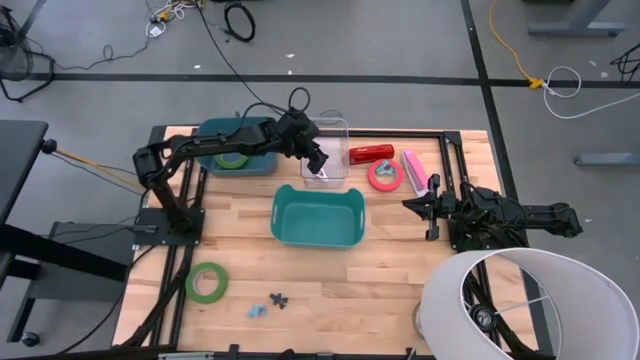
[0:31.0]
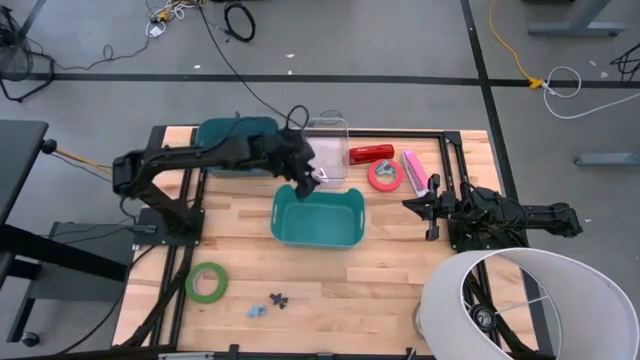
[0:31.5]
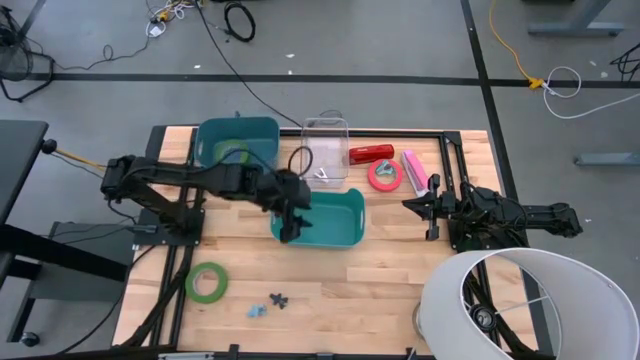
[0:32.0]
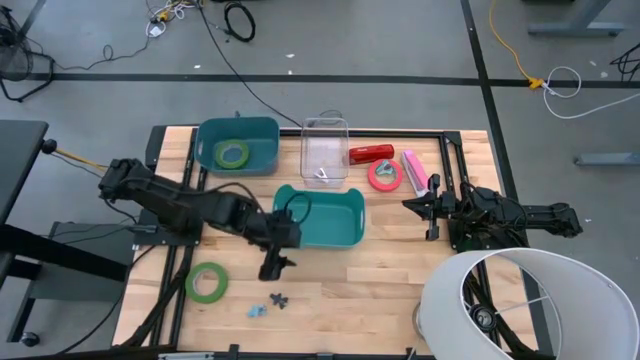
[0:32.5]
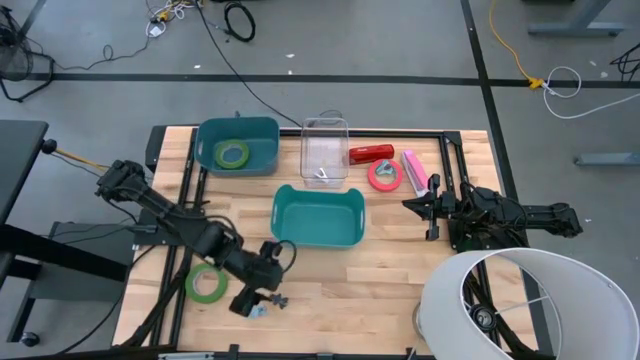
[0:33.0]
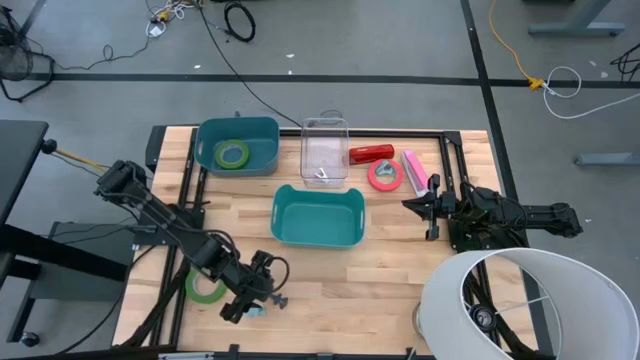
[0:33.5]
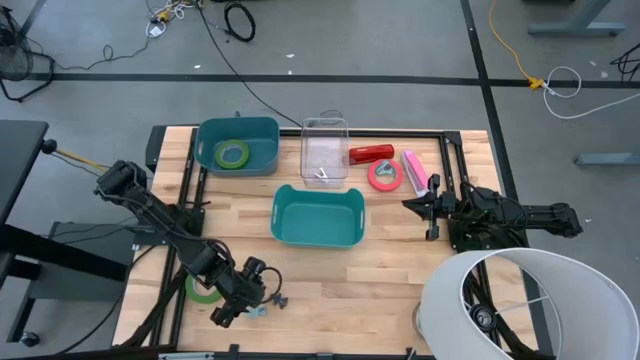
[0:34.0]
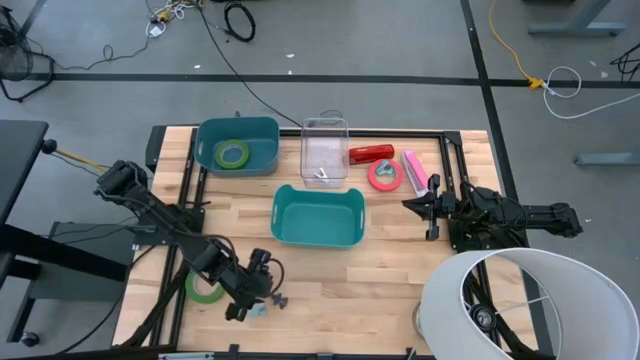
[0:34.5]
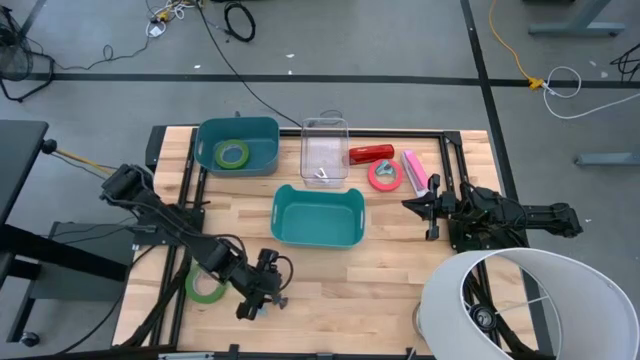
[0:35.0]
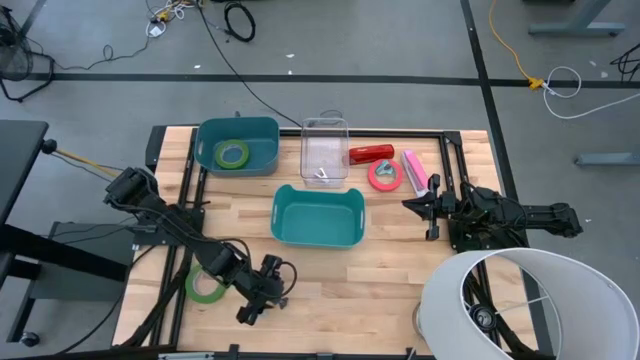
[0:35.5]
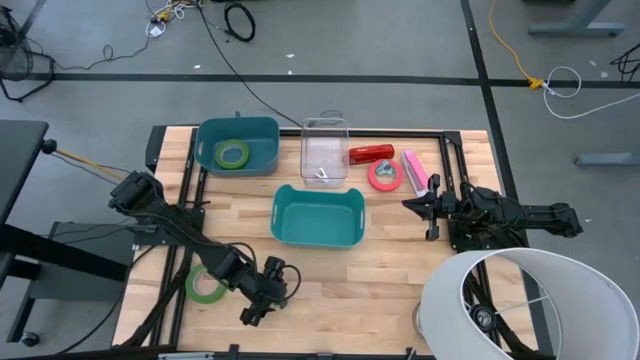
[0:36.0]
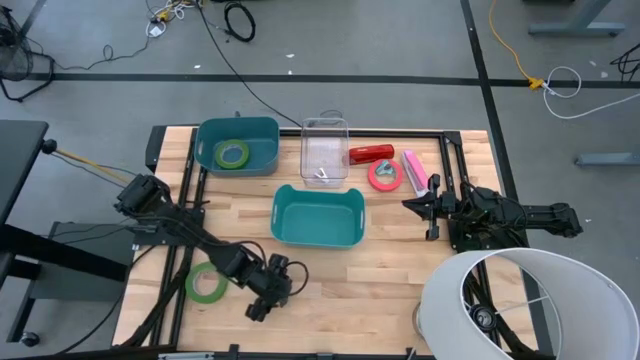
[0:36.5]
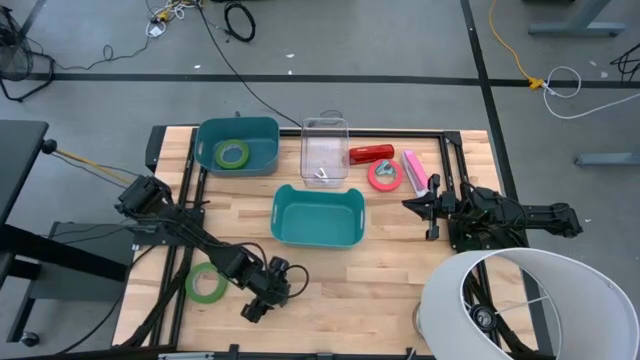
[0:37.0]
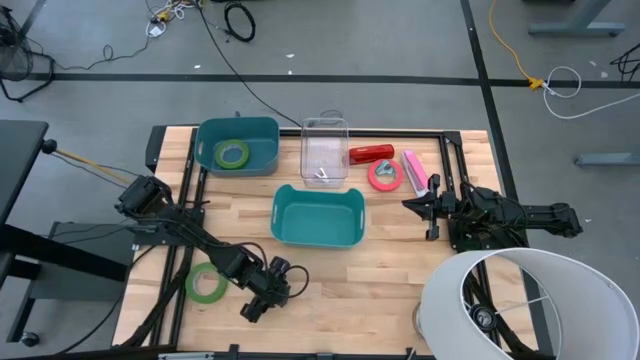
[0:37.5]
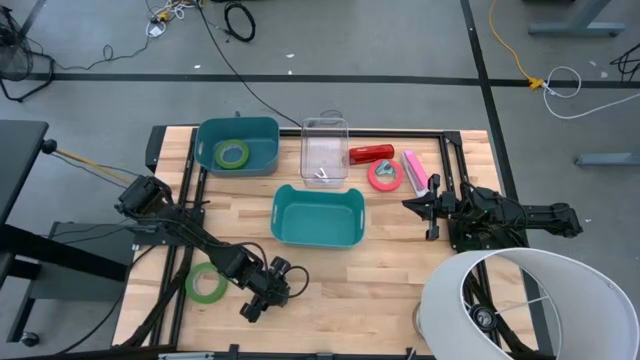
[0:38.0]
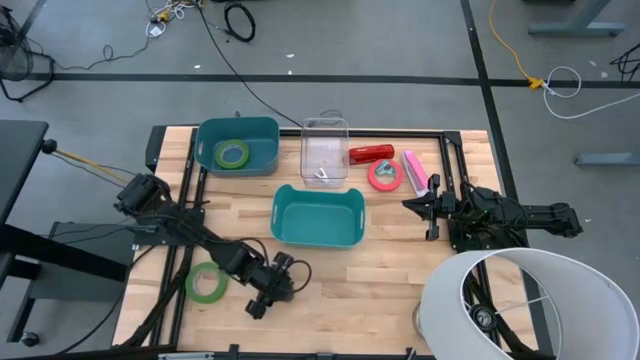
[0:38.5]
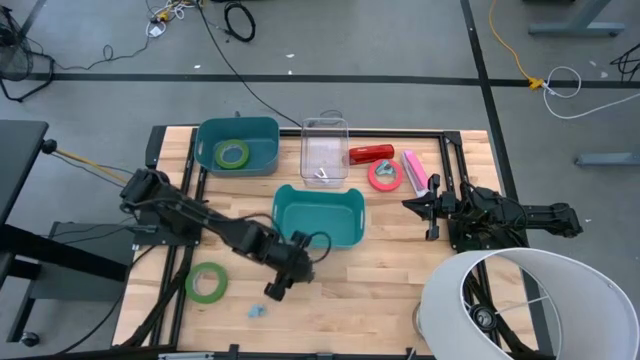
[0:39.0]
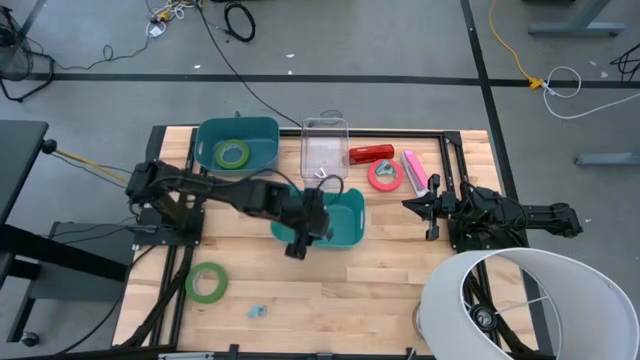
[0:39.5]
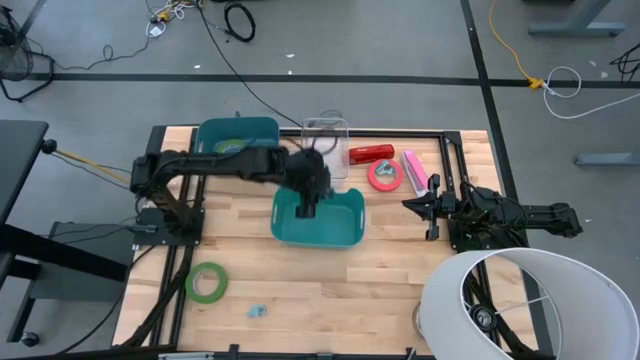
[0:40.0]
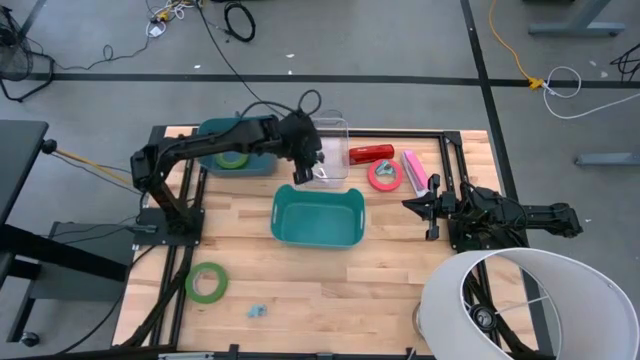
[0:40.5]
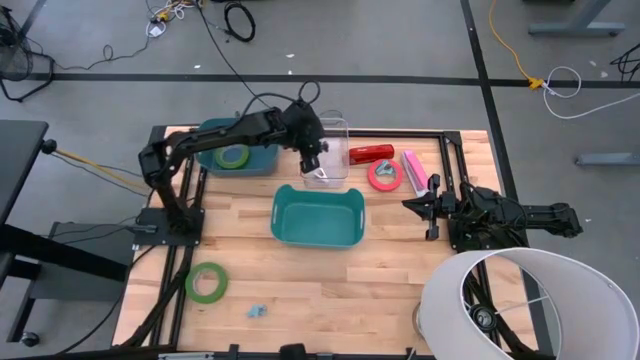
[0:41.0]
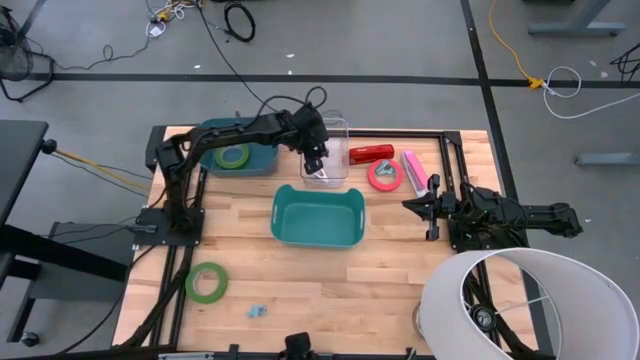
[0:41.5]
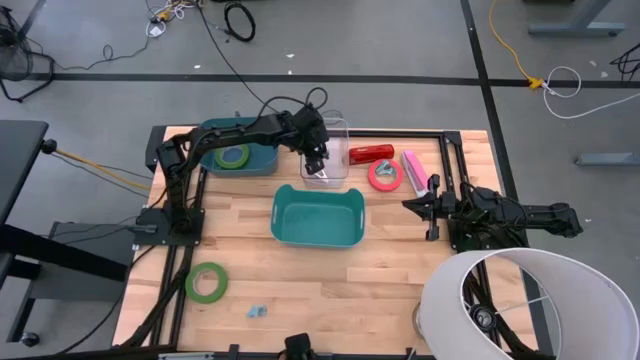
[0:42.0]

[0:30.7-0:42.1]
Task: Pick and place Stapler, Stapler remover, tape
Put the dark blue staple remover into the transparent bin

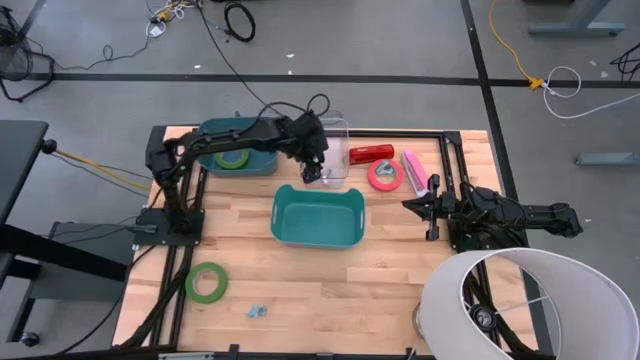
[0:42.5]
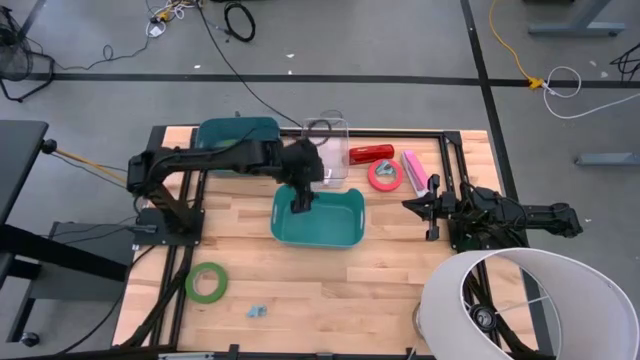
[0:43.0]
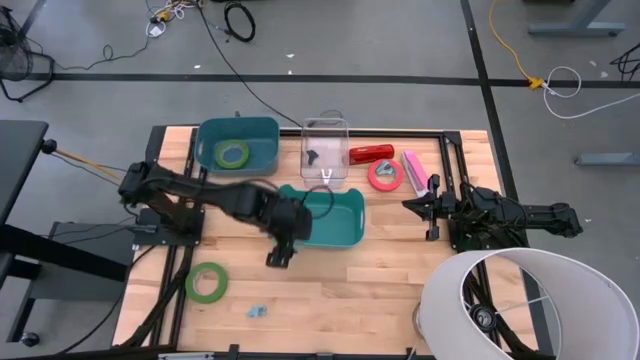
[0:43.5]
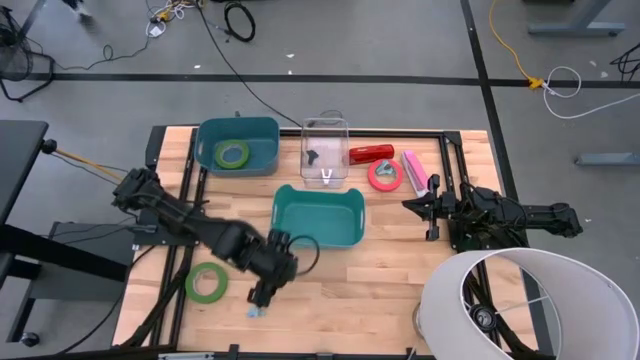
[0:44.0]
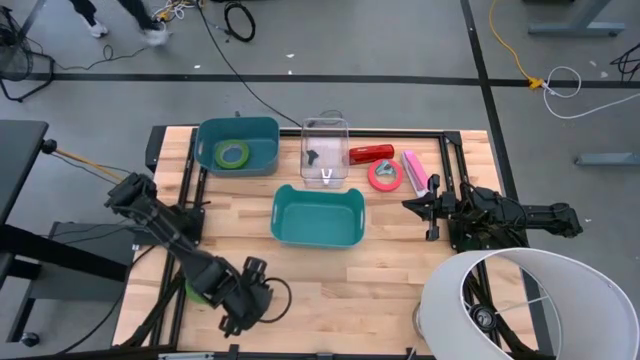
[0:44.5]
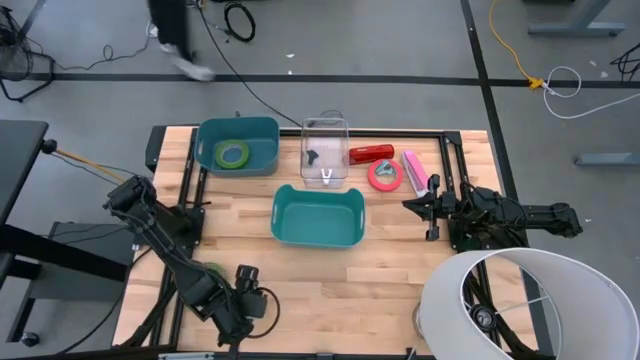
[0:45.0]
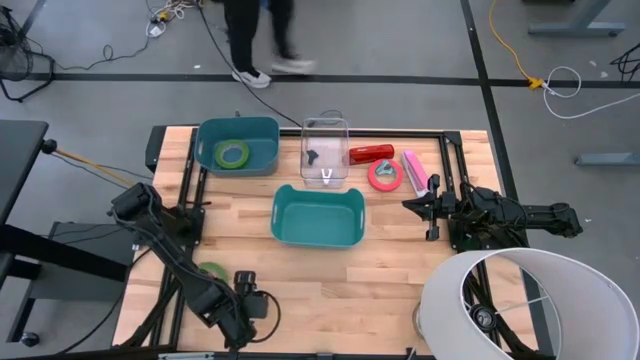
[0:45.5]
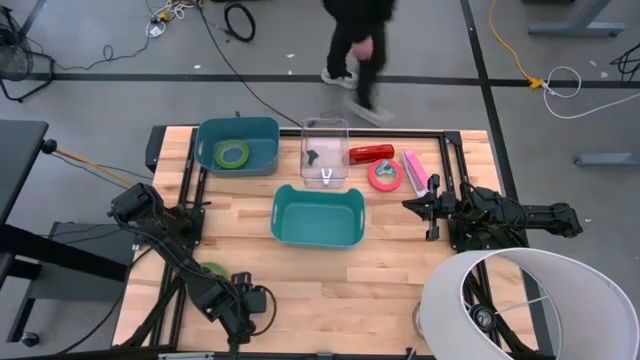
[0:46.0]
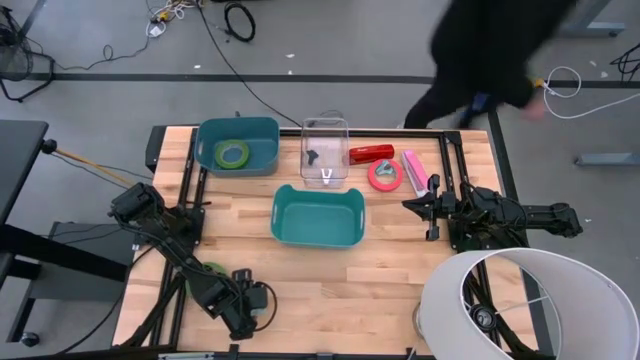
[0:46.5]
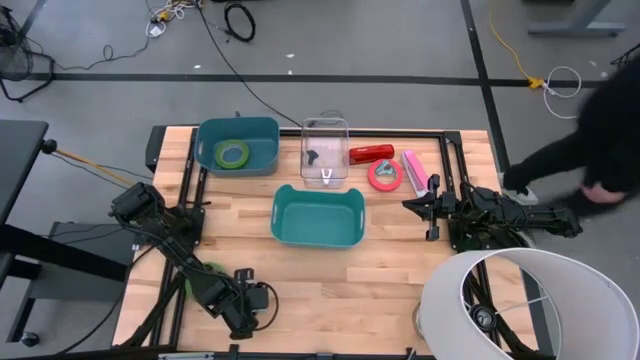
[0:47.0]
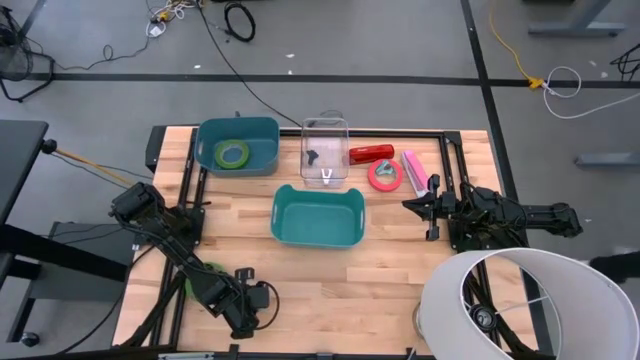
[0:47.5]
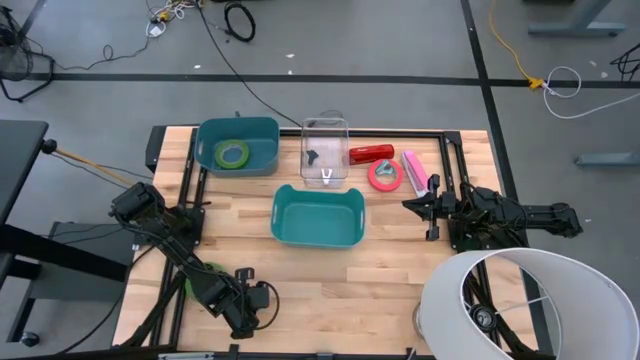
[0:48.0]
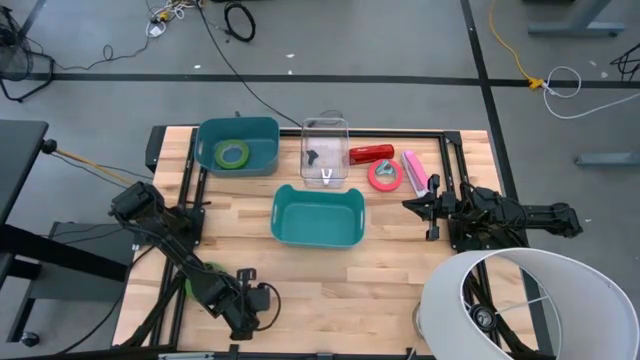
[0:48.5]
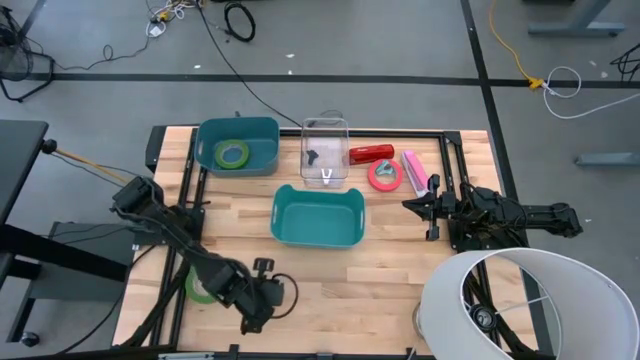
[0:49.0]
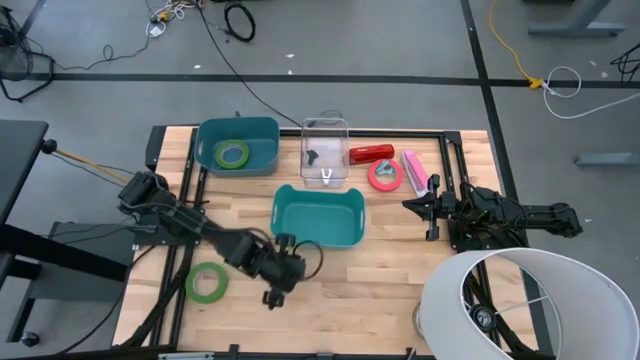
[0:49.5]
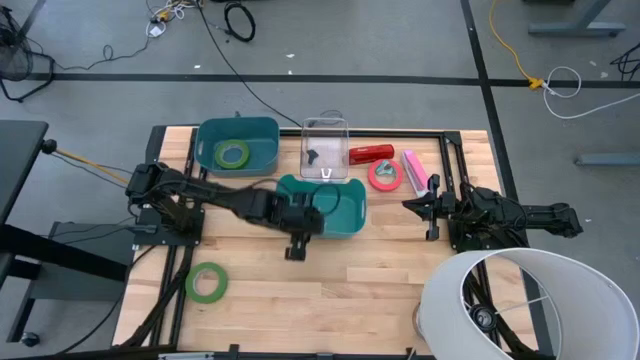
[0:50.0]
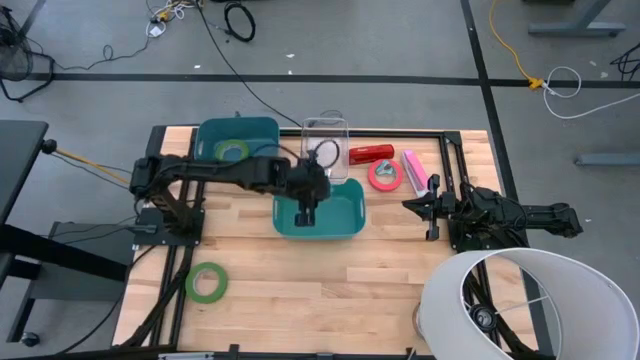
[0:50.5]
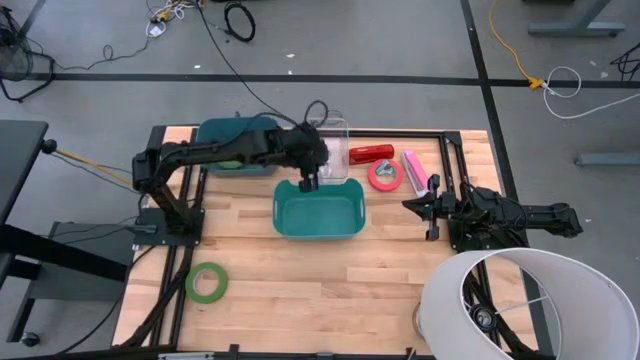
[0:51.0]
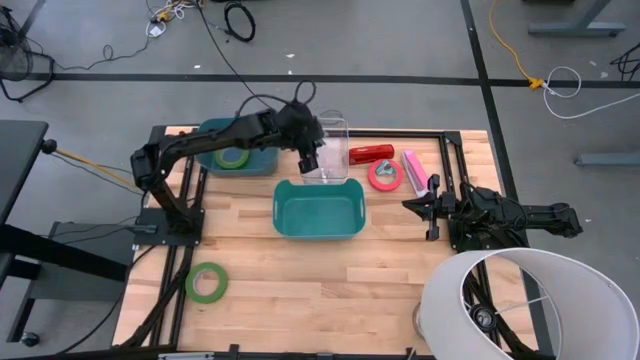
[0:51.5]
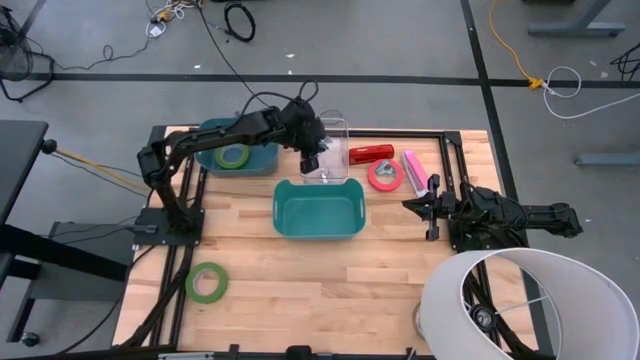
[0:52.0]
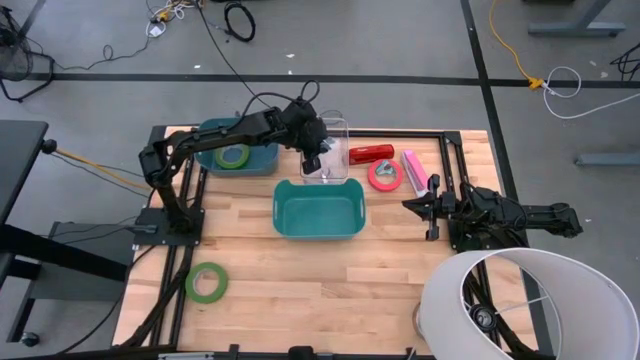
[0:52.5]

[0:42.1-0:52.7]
Put the blue staple remover into the transparent bin
